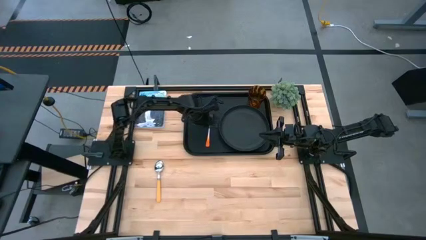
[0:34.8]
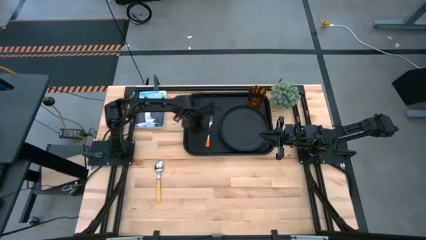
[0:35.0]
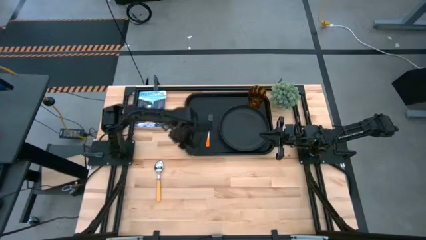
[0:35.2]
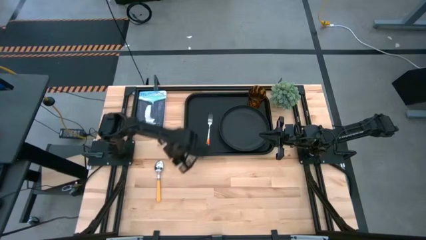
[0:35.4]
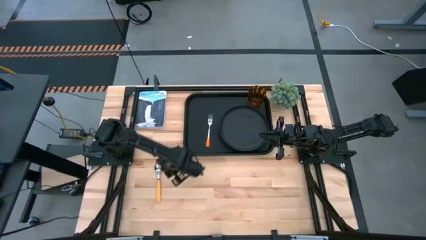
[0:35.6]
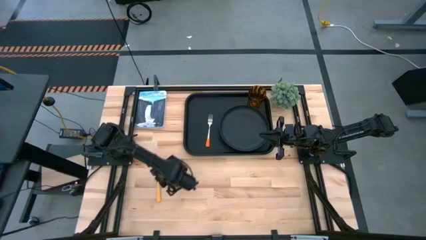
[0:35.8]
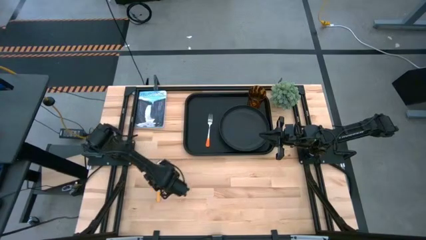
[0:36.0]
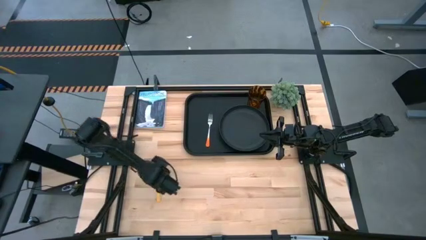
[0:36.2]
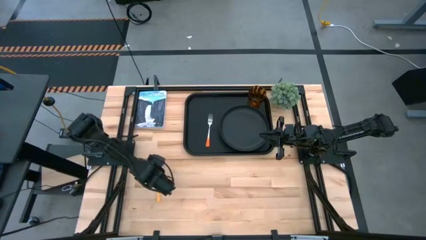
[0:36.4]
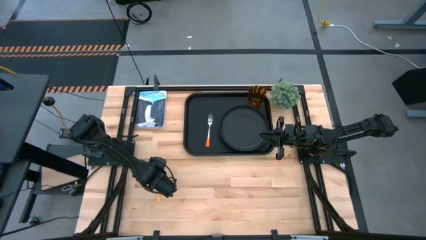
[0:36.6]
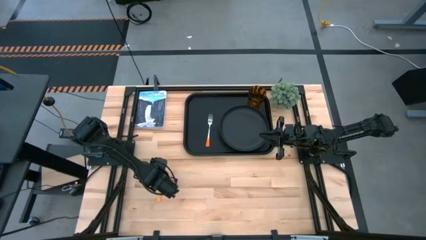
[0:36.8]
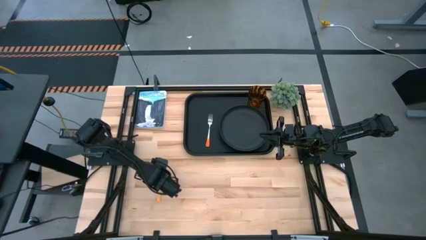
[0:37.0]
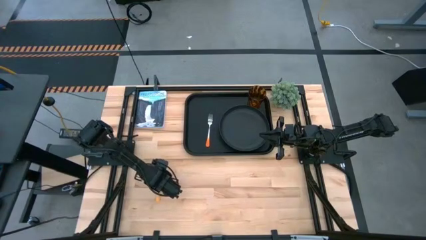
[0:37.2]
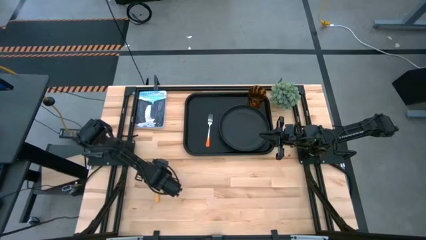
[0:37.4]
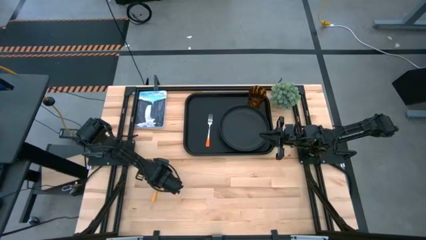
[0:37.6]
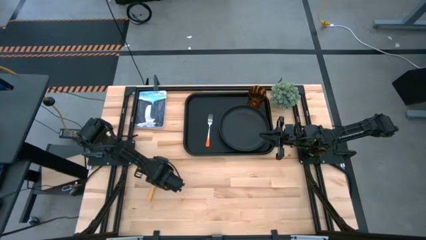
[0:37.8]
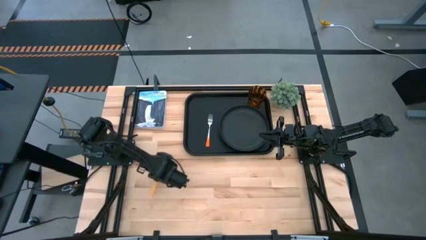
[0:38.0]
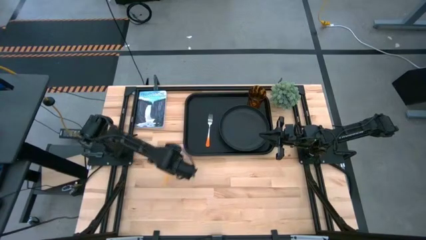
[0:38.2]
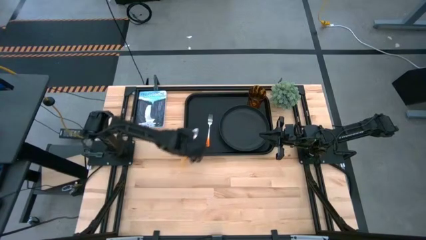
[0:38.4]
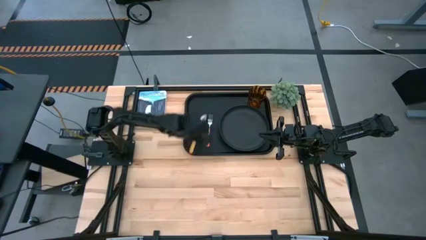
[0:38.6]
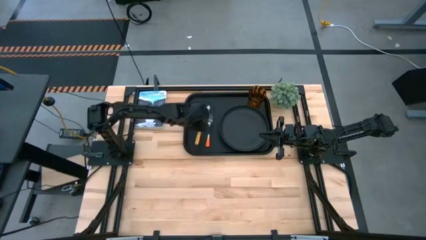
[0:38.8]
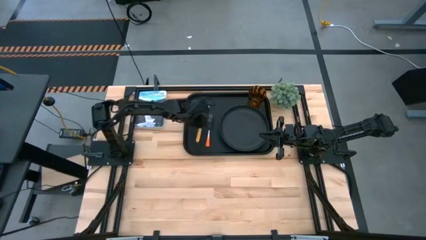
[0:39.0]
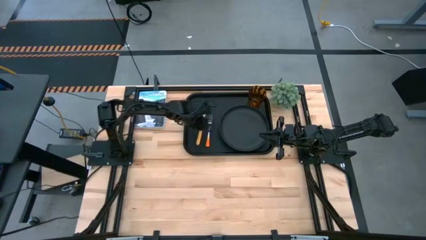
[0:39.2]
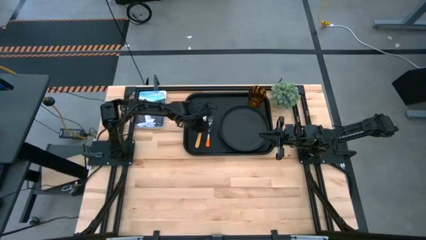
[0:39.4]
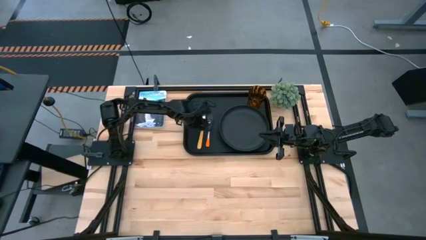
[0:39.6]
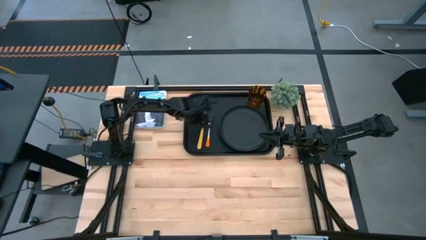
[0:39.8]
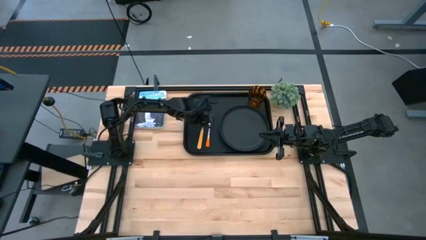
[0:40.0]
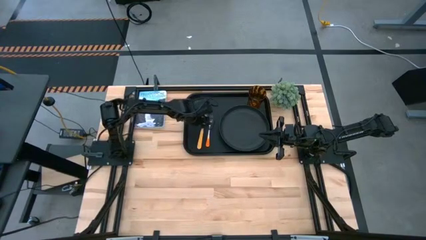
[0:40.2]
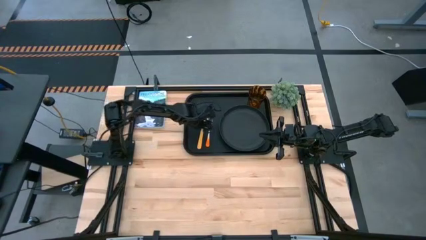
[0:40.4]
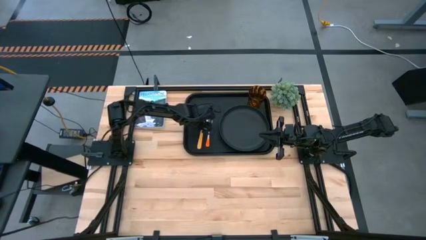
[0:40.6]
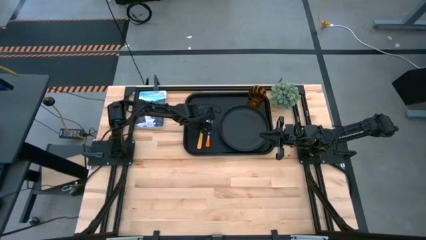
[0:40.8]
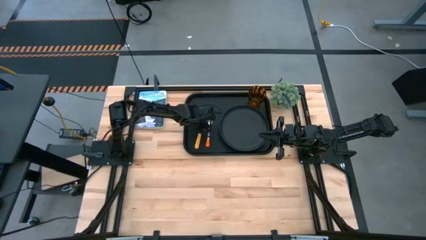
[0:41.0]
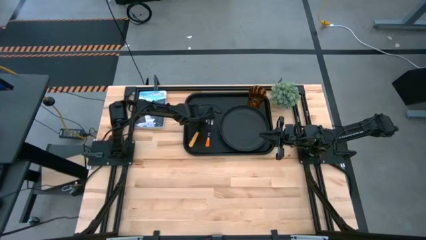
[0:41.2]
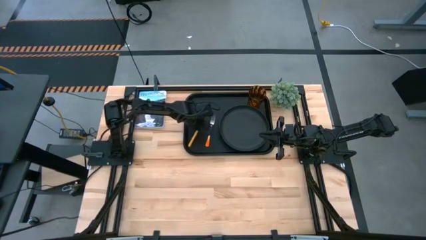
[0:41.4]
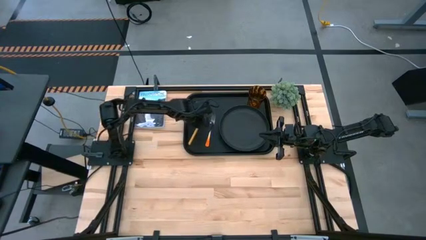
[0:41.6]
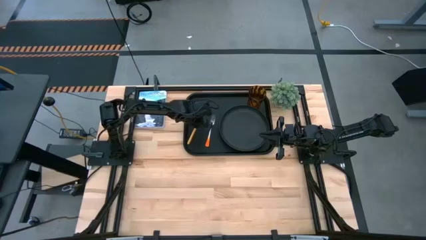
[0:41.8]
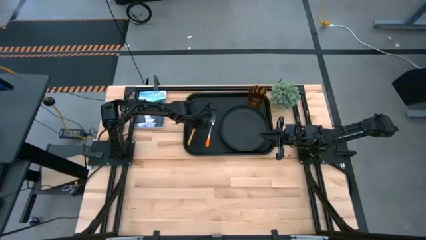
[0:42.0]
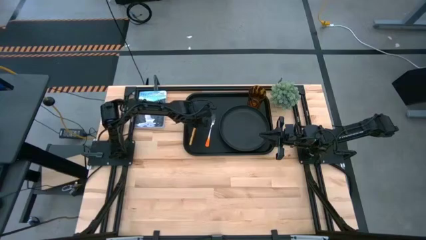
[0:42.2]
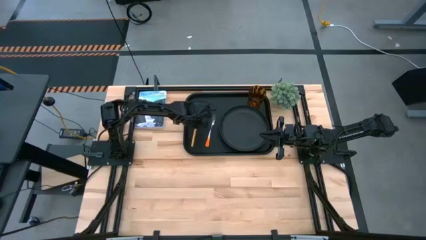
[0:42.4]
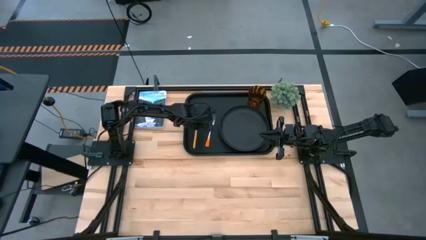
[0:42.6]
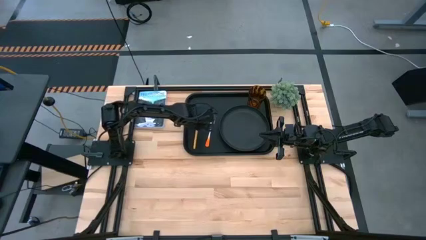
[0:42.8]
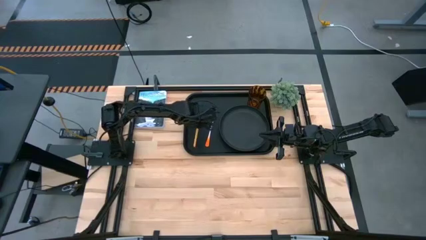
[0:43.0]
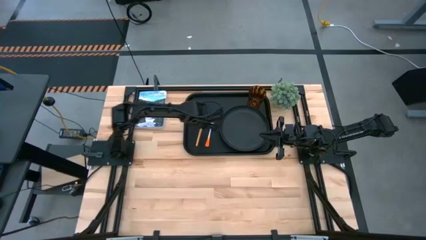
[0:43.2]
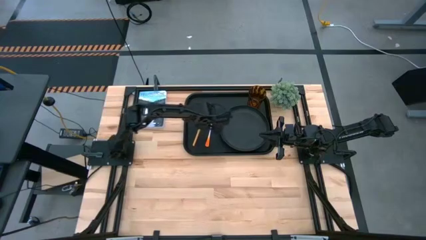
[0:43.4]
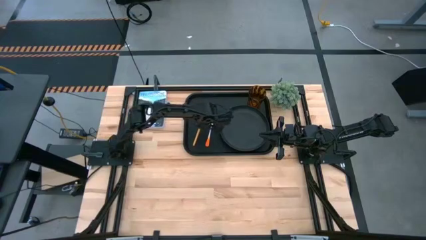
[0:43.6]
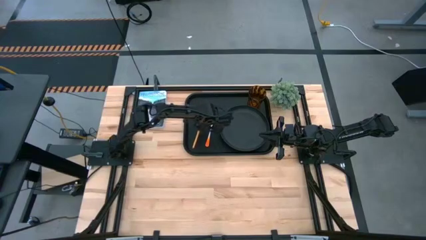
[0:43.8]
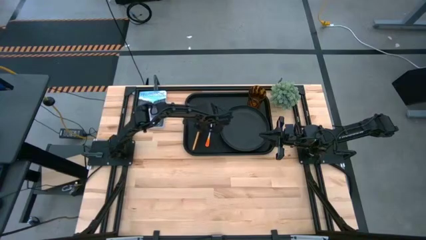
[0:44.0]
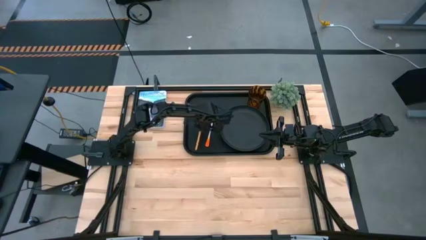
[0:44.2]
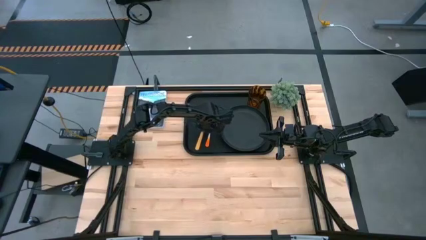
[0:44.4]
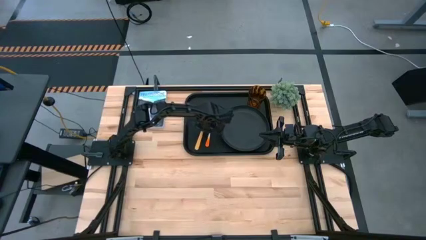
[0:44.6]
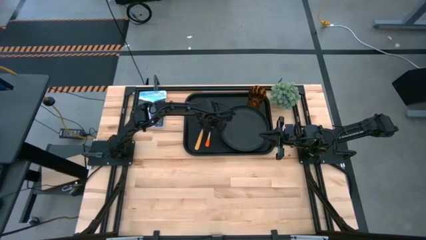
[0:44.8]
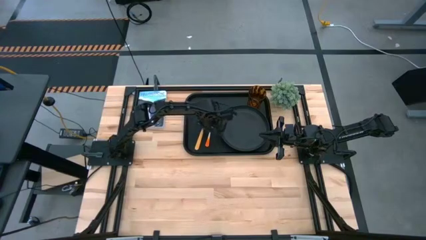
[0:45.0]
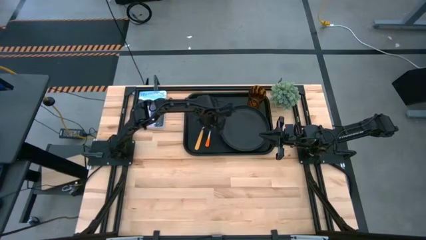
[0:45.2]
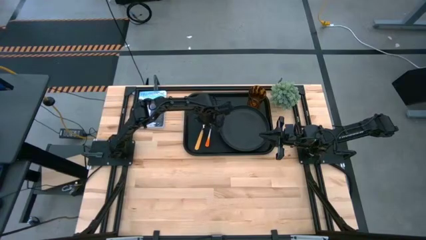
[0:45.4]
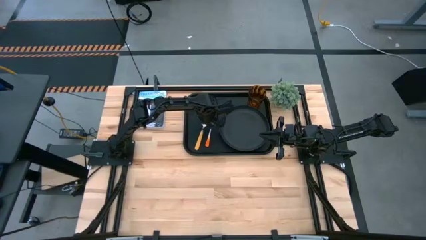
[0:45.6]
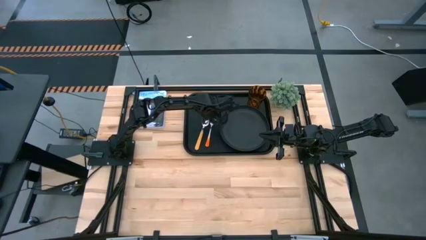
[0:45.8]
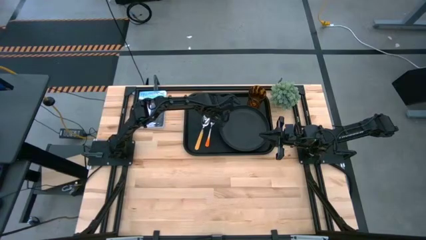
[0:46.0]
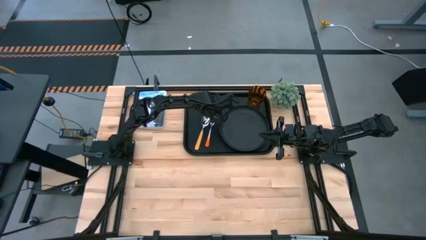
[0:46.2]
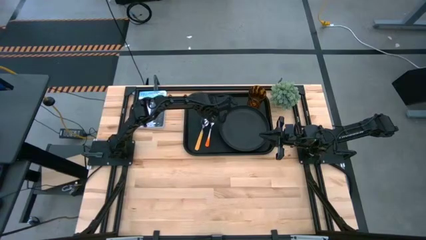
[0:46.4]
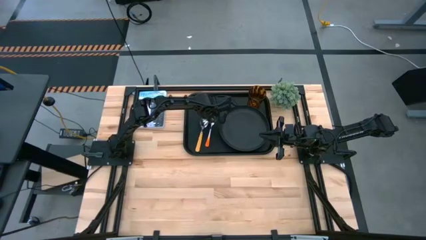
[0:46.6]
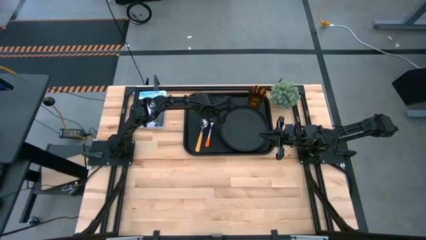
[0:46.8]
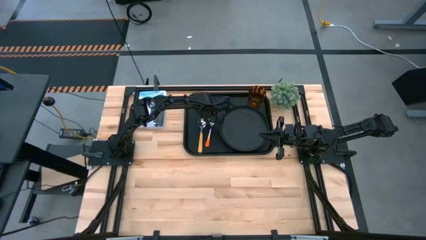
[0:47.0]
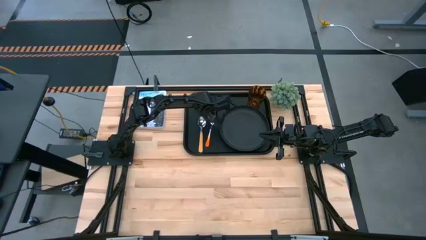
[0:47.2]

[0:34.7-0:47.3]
Task: Pick and place plate/cup/fork/spoon on tray
Put the yellow spoon on the black tray on the left side of the orange fork

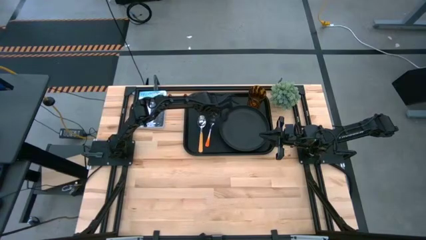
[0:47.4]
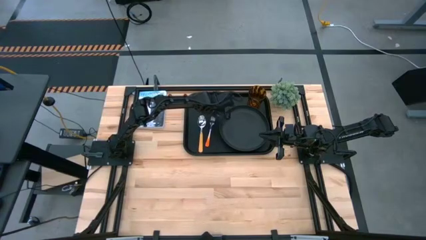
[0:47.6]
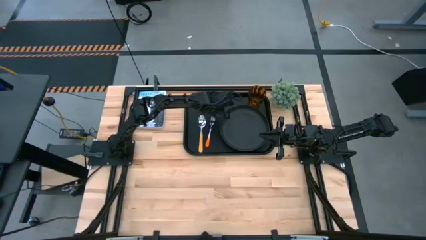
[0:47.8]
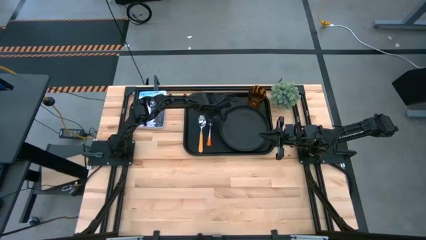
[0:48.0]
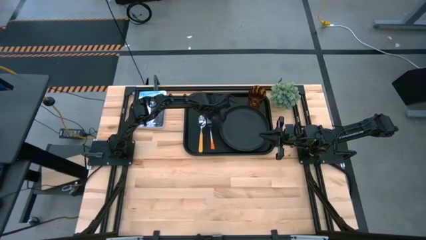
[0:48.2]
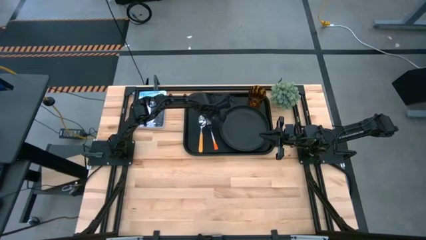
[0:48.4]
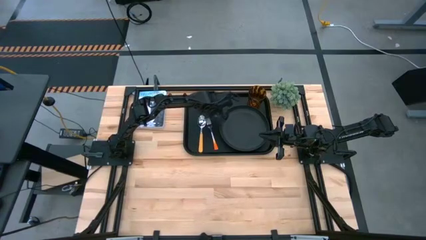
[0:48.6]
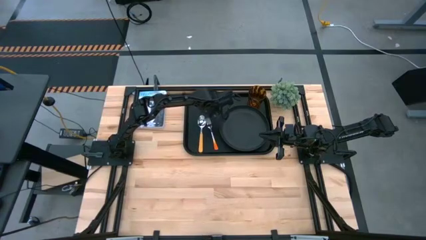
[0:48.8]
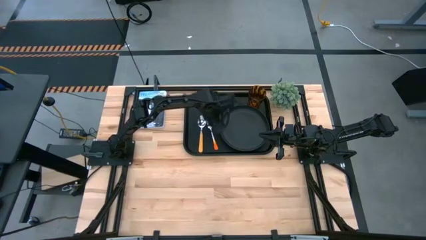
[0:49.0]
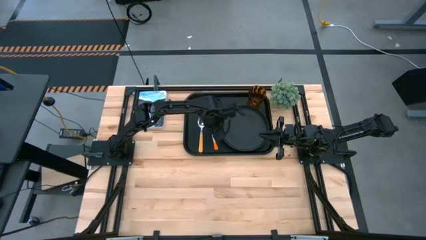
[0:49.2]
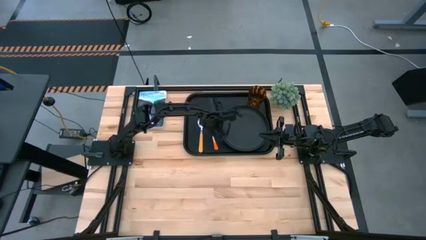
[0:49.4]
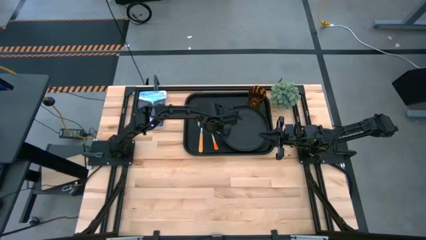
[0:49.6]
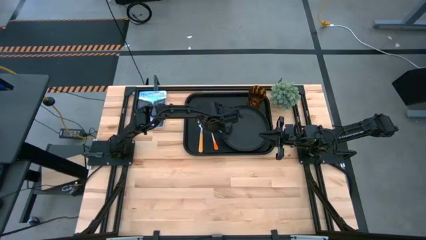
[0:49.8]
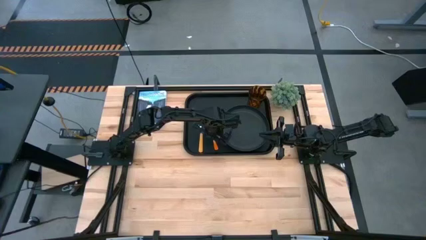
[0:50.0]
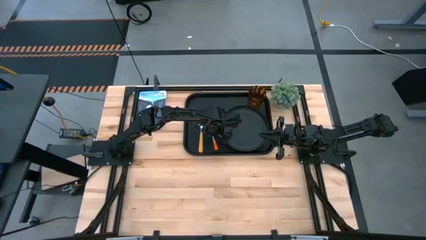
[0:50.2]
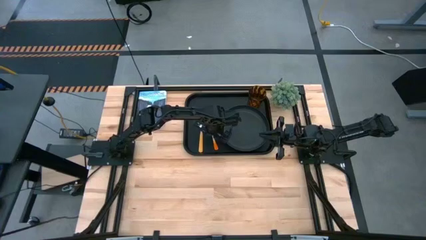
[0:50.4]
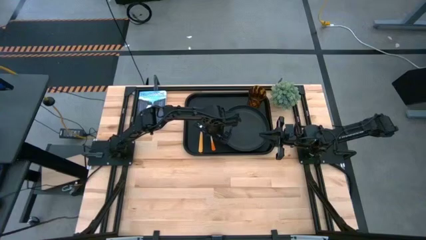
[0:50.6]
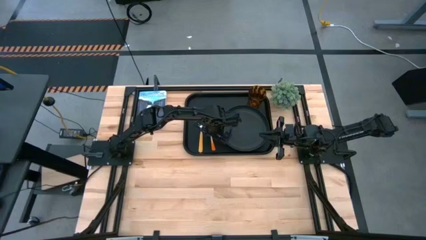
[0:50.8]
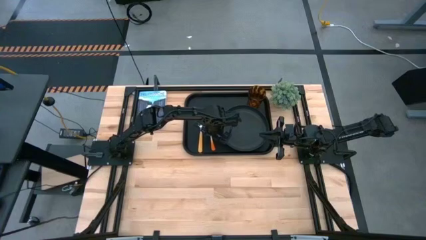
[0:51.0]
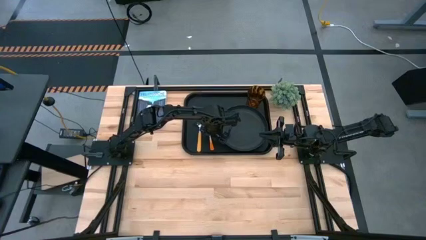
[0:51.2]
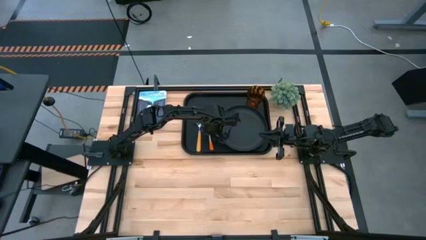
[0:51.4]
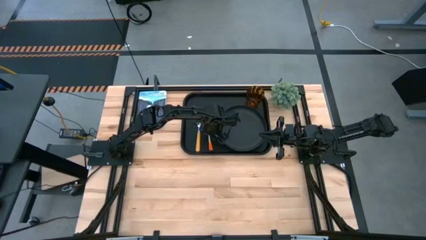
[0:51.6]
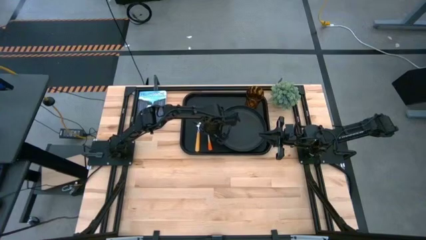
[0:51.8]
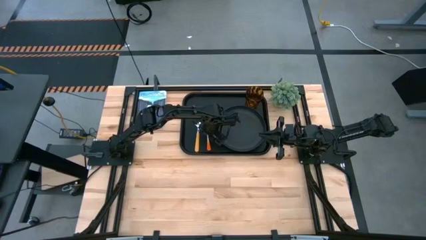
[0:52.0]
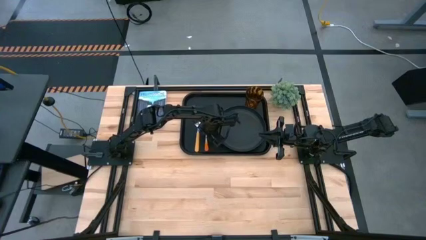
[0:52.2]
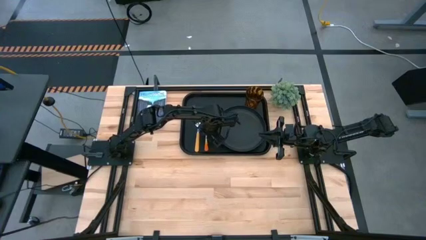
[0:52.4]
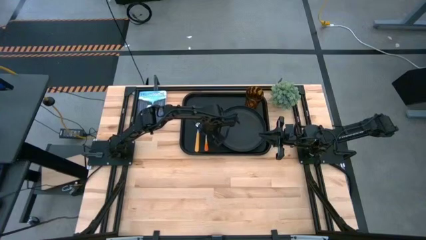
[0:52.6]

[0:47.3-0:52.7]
Adjust the orange fork on the black tray
